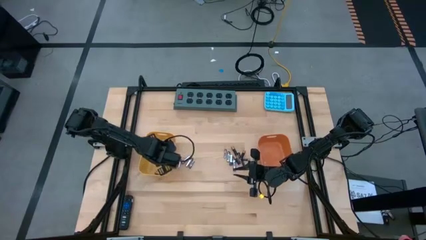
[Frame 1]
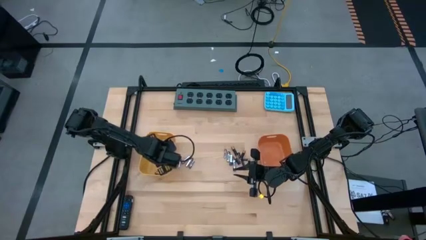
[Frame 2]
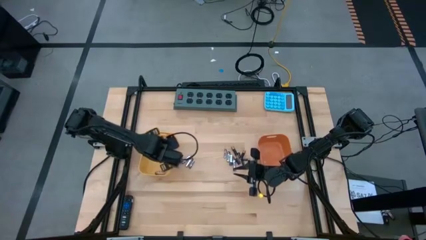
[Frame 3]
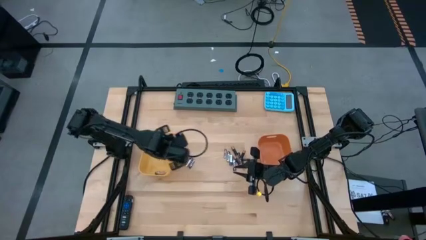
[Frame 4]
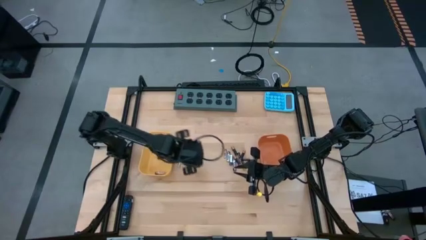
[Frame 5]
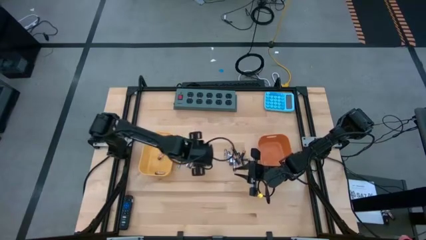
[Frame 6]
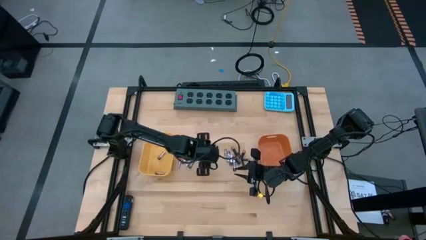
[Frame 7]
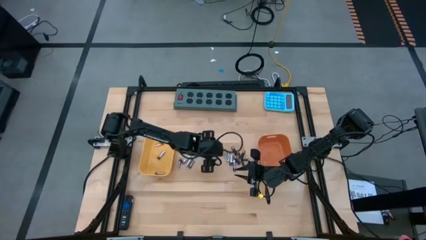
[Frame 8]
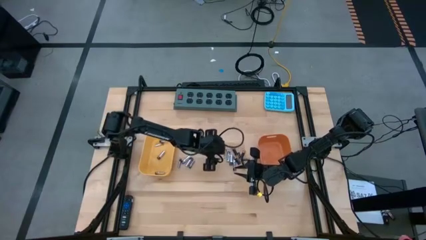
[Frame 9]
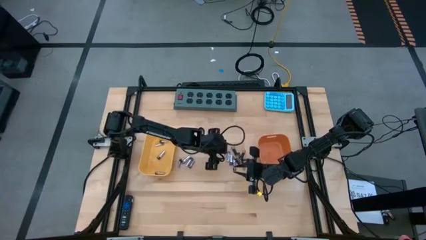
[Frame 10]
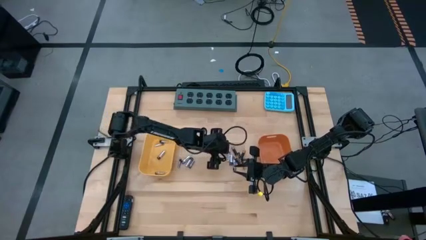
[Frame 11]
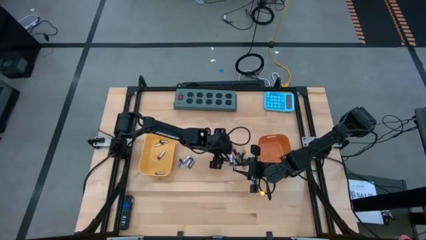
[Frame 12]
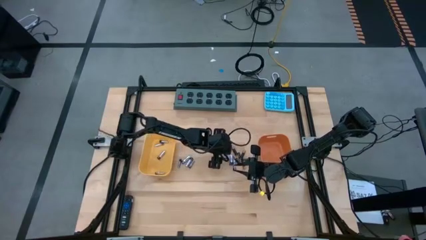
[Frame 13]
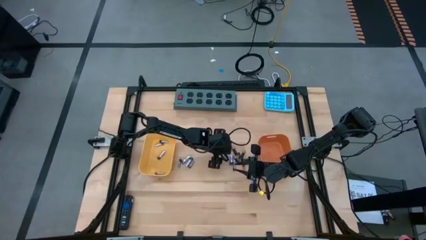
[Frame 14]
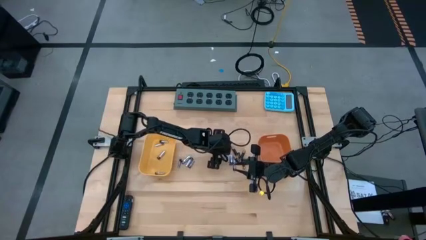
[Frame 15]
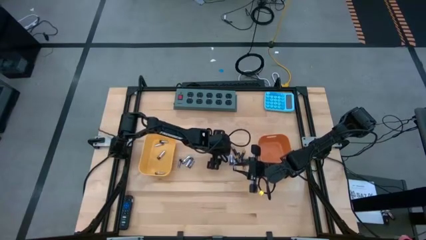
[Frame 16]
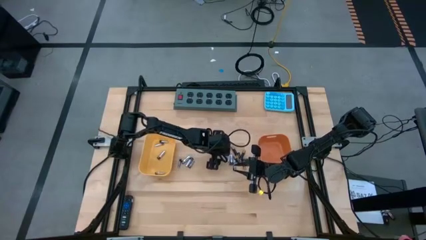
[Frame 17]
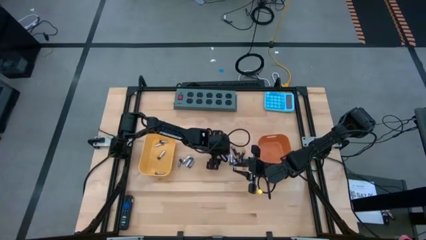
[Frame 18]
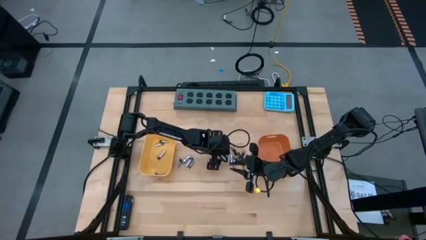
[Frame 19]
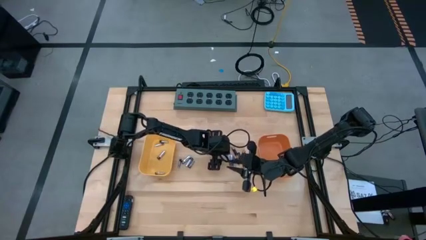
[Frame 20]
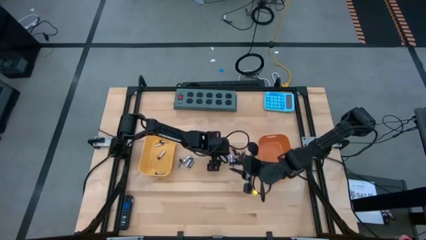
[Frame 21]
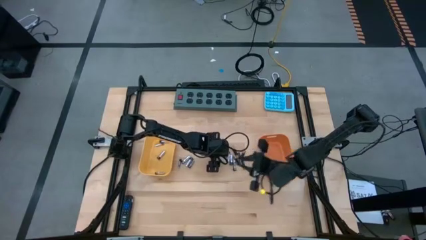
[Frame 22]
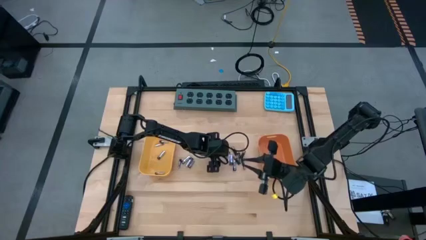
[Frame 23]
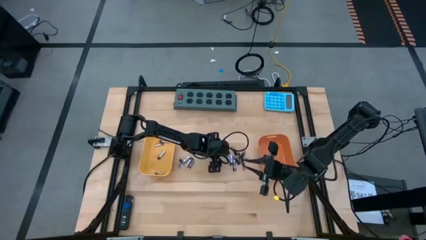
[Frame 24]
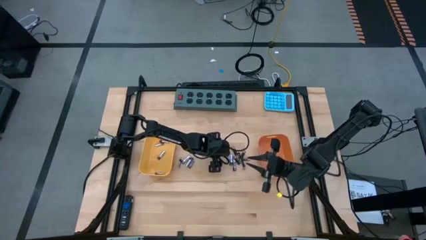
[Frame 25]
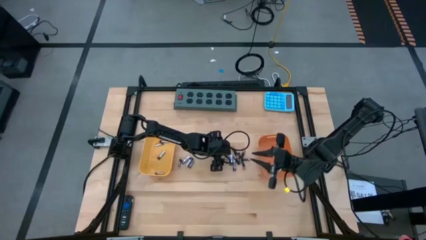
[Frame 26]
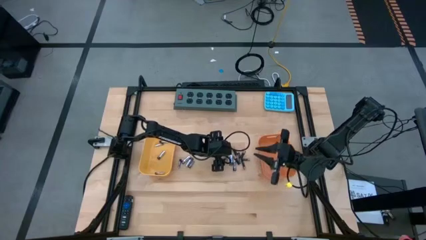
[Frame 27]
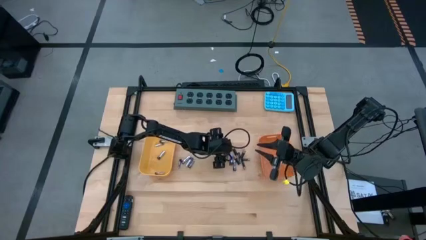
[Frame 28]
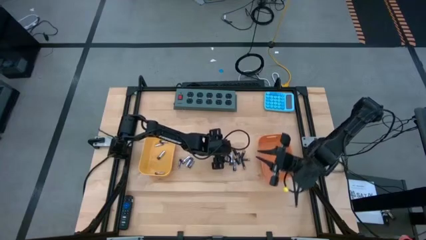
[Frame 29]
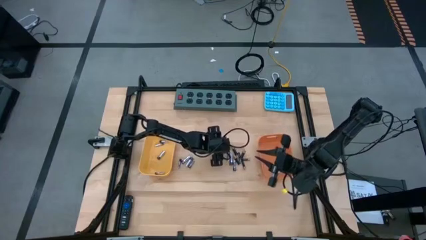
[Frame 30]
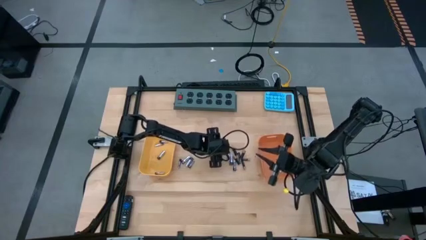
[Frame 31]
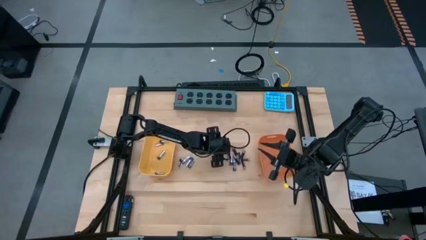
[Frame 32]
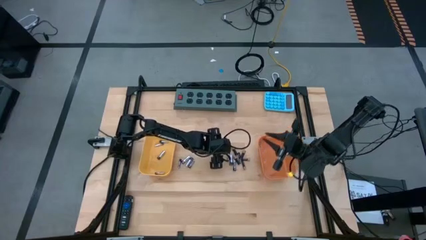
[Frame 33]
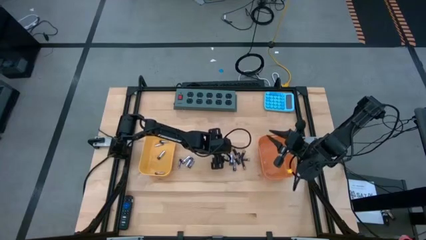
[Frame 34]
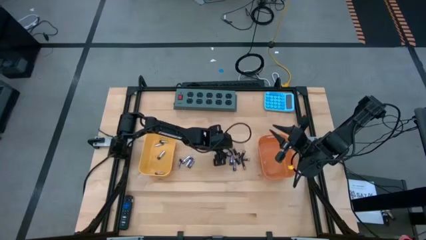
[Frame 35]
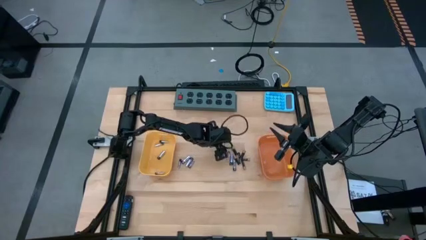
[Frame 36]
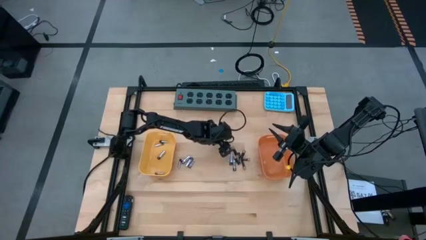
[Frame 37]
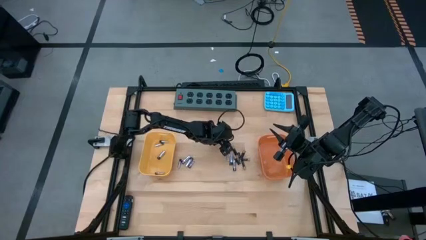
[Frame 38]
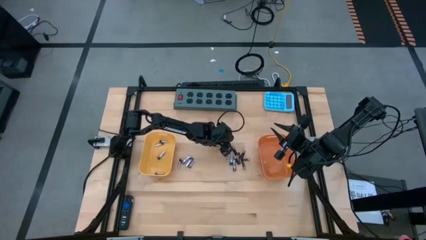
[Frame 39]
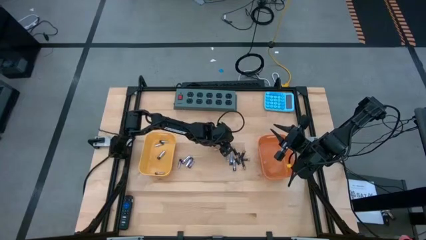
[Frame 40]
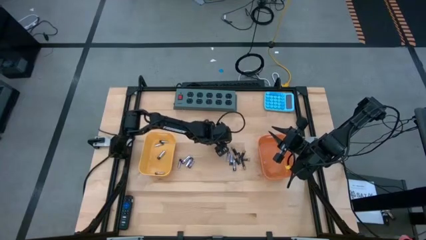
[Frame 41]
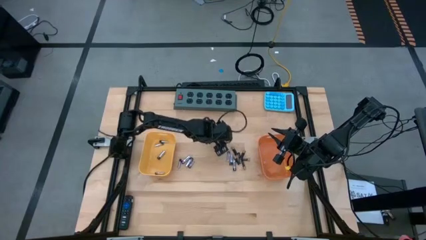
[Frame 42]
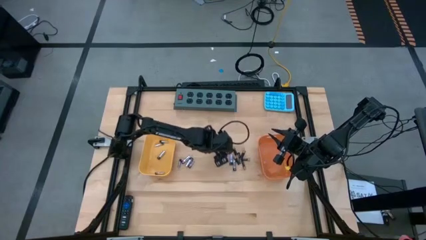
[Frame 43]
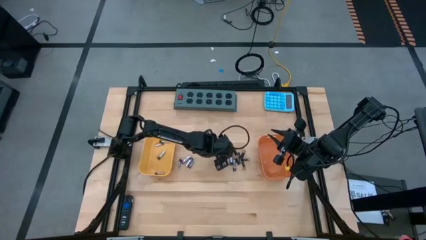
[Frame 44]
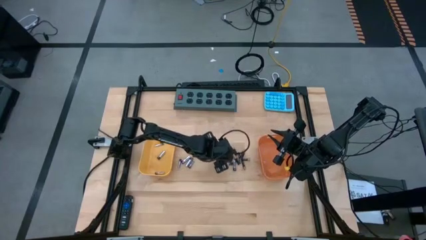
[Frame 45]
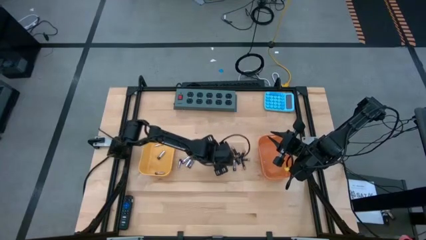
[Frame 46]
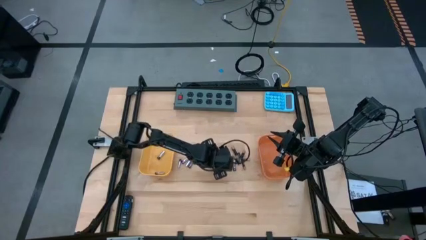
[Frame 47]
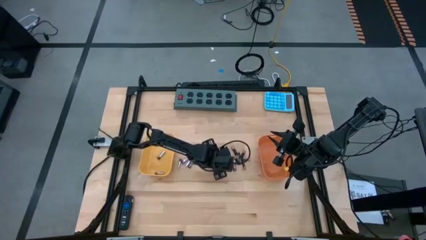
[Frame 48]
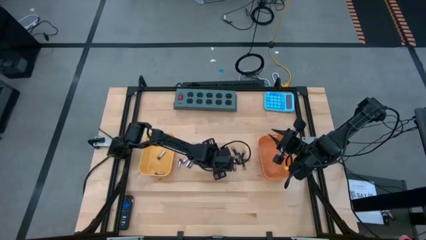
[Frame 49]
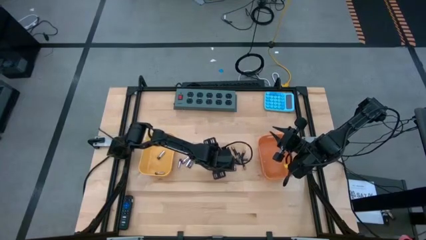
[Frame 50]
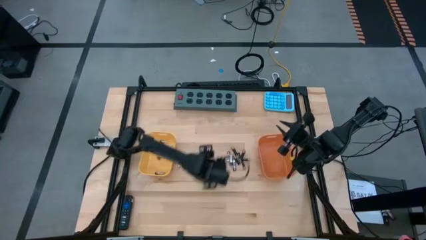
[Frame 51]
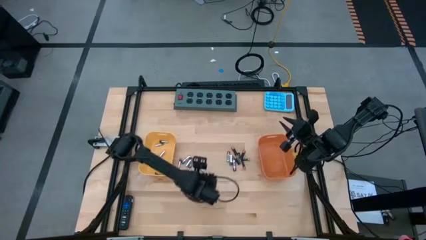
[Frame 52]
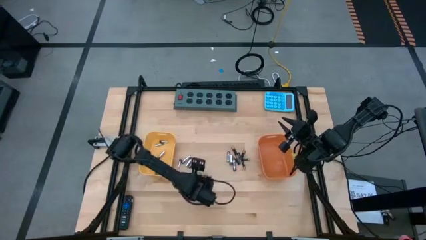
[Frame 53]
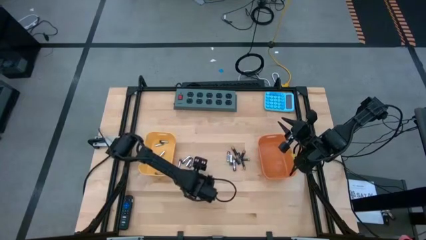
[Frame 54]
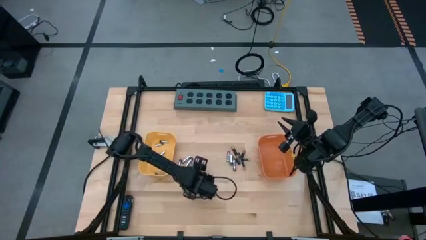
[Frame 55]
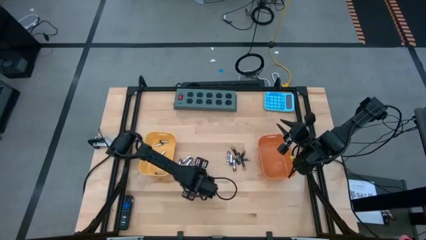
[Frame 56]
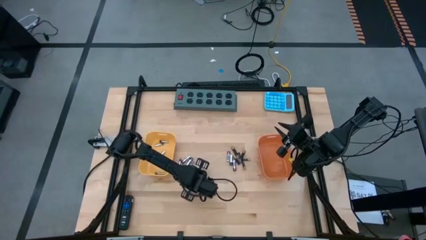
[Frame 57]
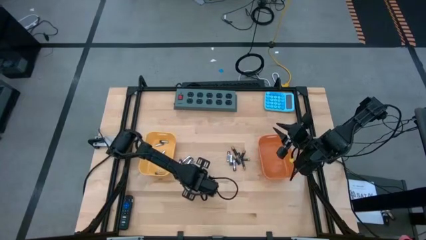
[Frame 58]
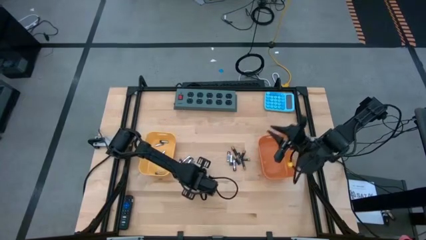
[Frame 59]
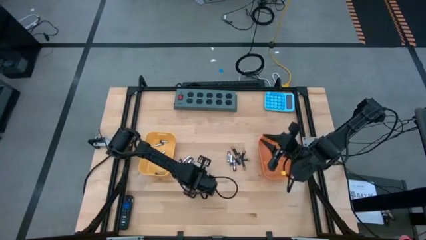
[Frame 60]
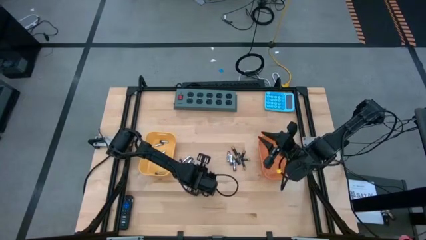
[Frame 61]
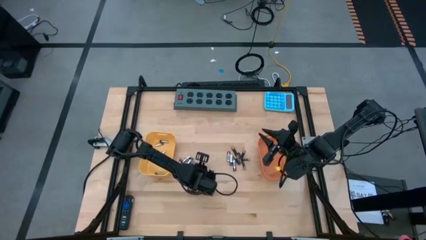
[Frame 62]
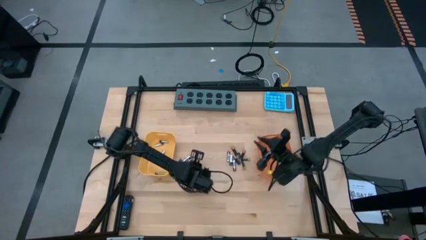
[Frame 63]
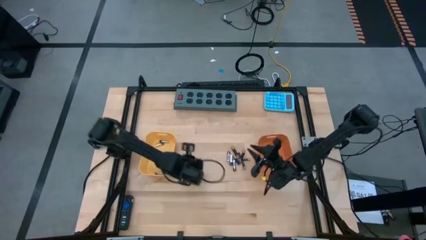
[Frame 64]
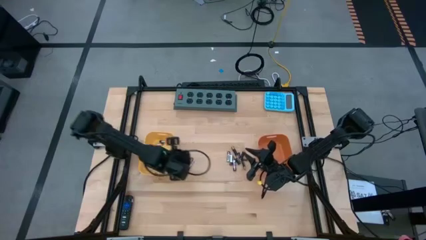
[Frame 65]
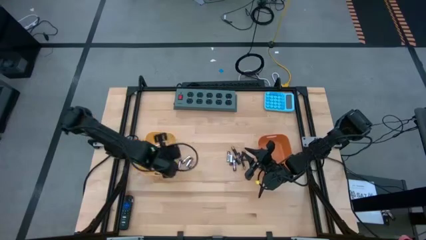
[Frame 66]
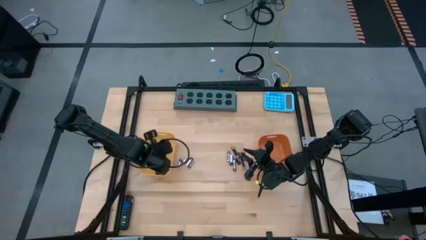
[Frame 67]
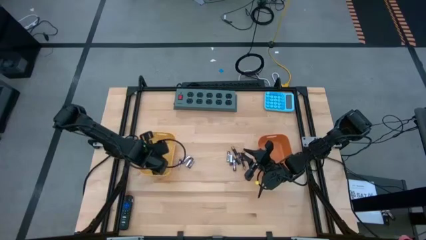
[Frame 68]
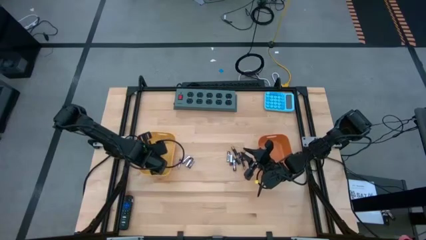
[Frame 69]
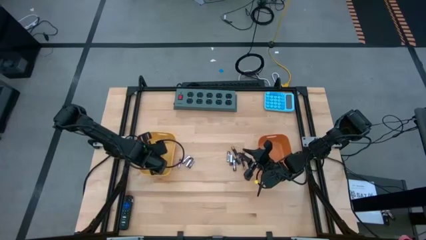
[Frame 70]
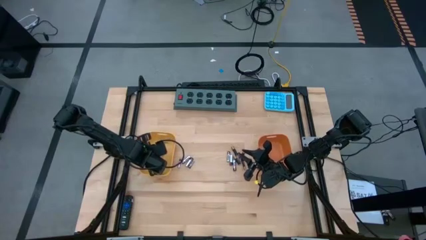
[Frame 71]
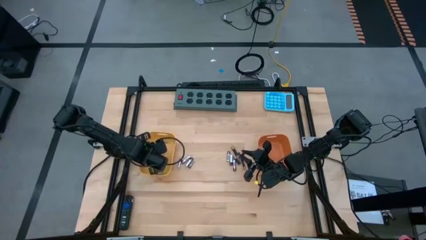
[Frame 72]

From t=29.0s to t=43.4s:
Task: Sort batteries
Put the silver battery into the yellow bin

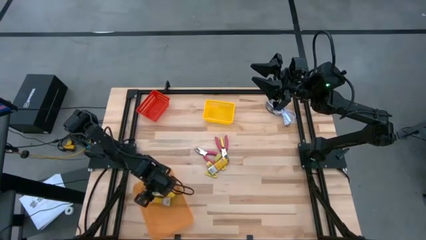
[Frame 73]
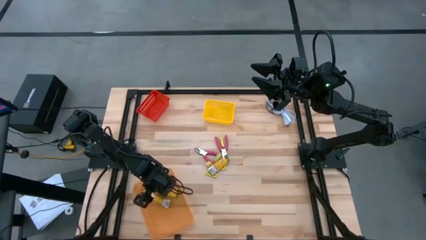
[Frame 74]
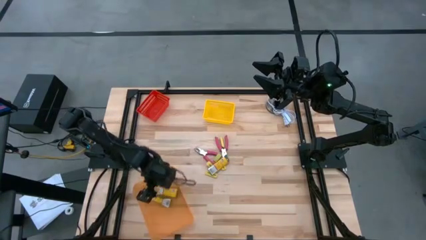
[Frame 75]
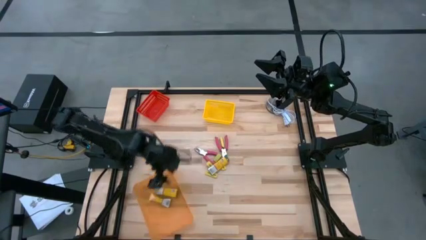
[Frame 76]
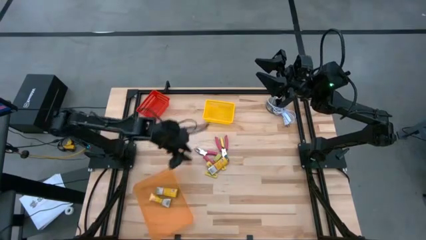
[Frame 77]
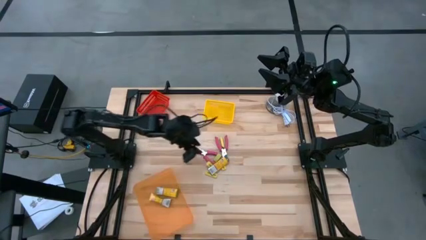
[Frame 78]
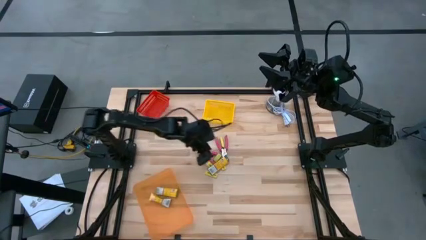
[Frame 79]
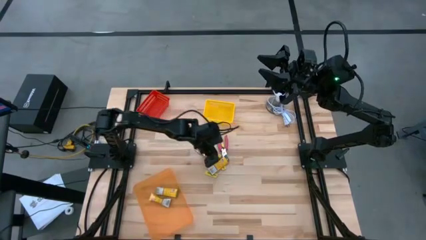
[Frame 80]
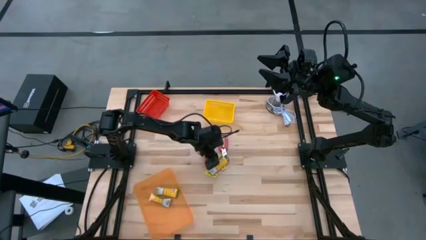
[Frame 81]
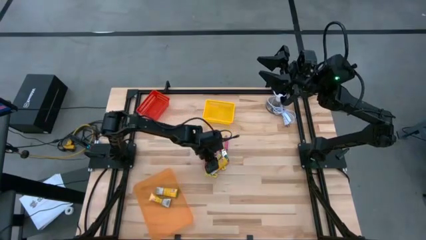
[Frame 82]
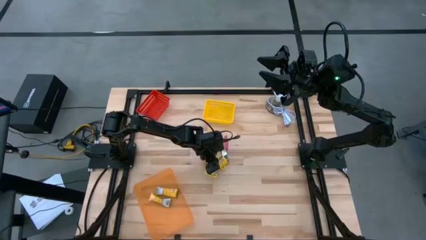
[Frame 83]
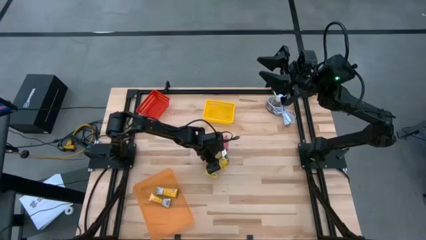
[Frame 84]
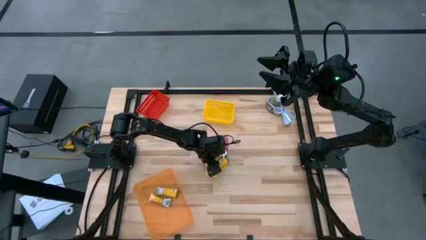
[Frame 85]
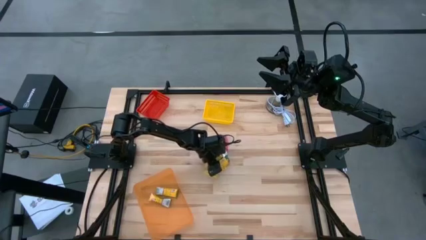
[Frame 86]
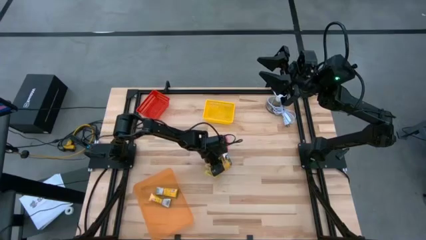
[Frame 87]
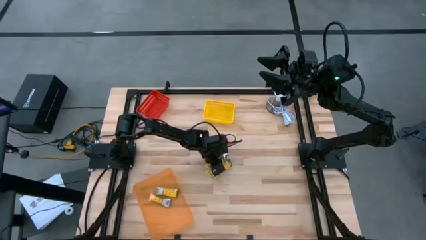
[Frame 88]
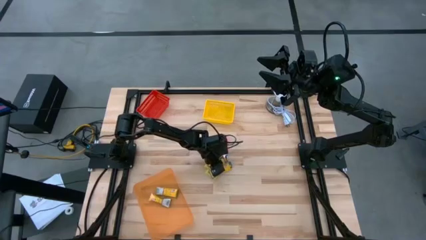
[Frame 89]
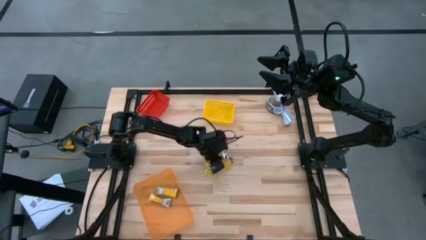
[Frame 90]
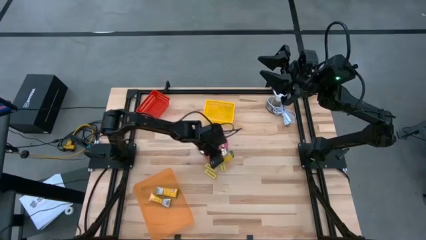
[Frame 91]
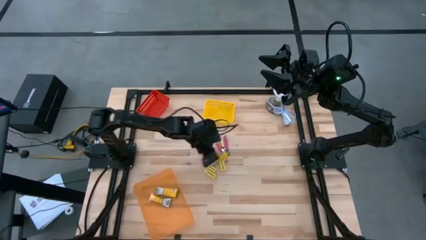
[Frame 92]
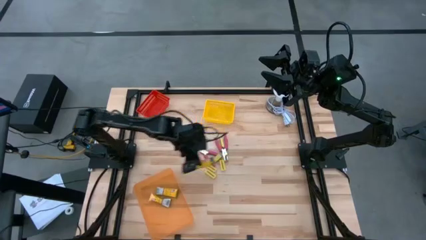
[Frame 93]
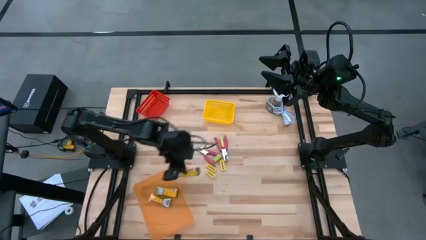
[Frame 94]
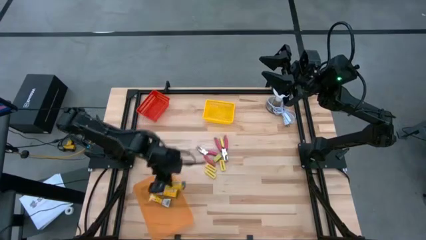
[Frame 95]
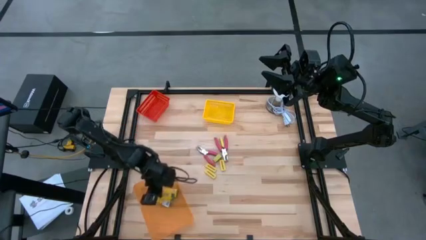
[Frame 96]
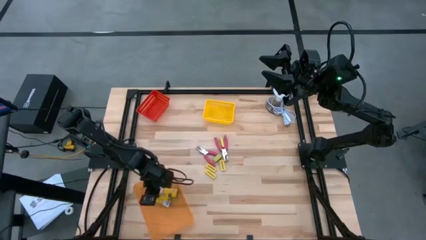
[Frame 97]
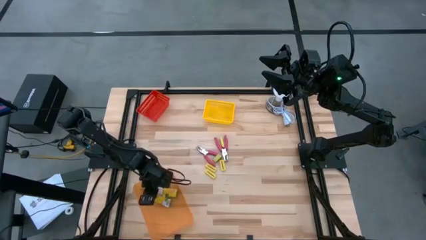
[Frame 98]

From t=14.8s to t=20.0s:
Task: Pick & Place School Supplies
Put the yellow crayon box into the orange bin
